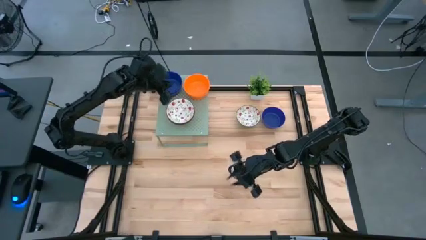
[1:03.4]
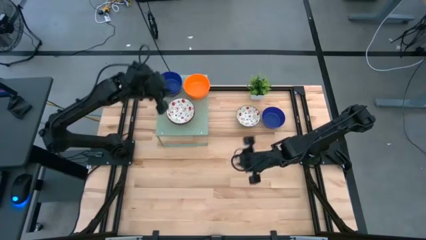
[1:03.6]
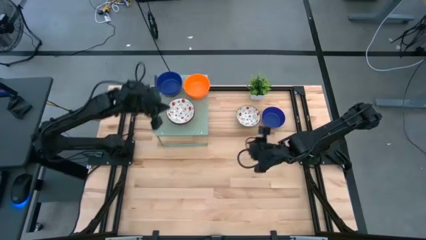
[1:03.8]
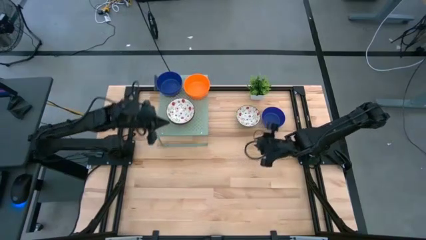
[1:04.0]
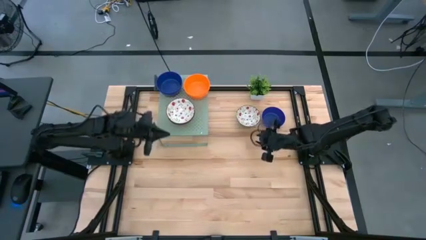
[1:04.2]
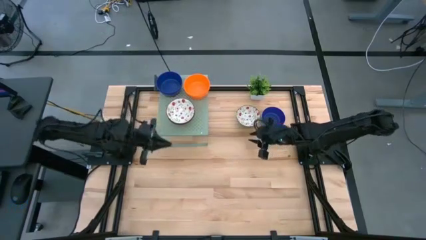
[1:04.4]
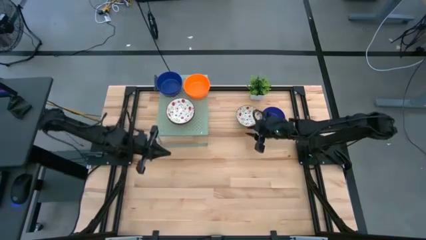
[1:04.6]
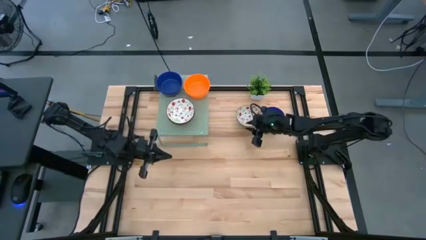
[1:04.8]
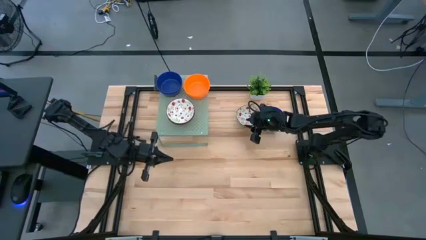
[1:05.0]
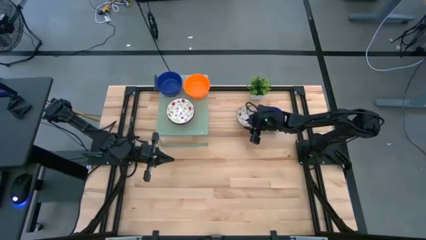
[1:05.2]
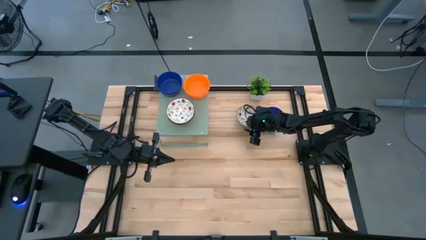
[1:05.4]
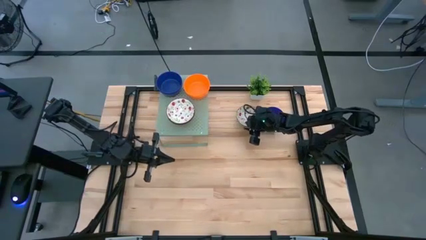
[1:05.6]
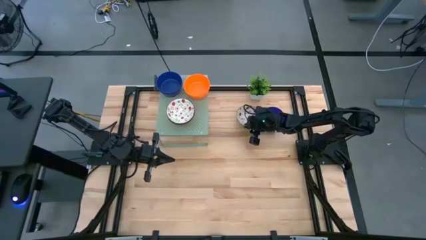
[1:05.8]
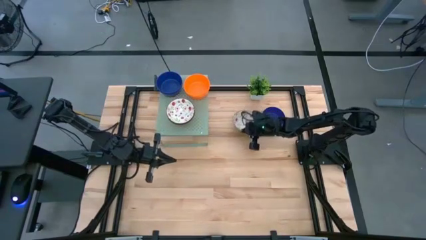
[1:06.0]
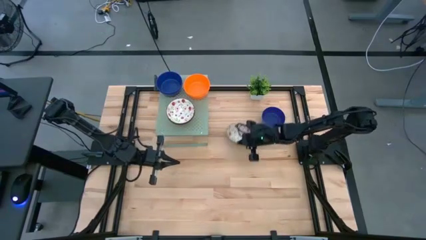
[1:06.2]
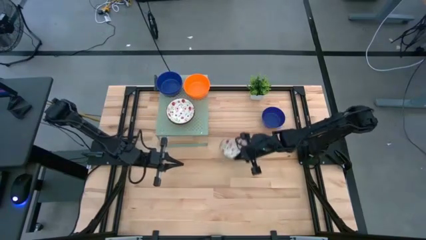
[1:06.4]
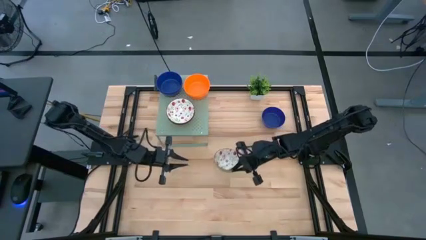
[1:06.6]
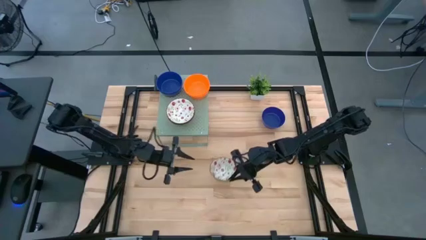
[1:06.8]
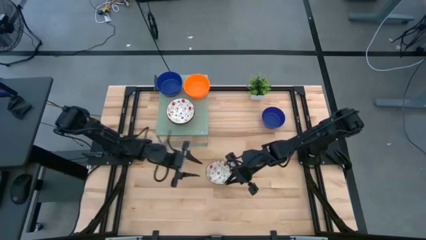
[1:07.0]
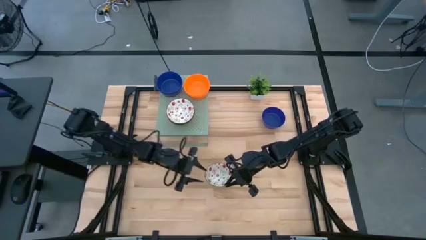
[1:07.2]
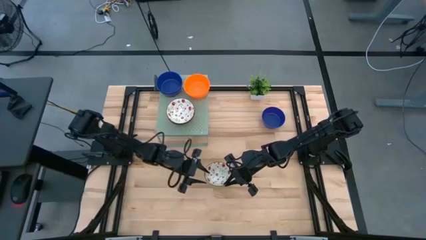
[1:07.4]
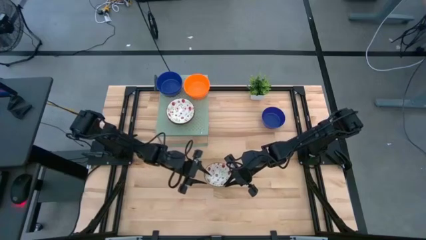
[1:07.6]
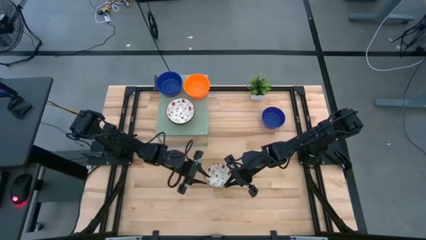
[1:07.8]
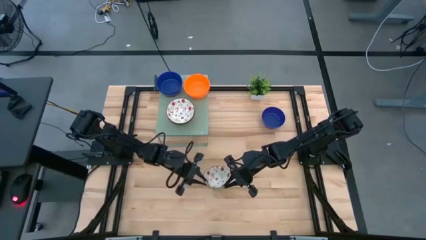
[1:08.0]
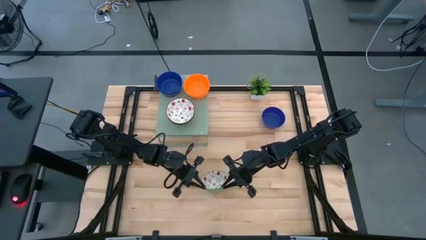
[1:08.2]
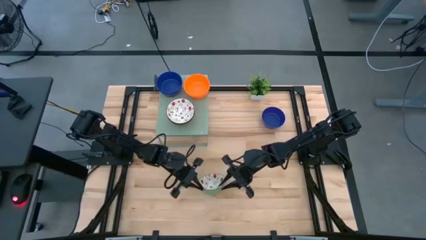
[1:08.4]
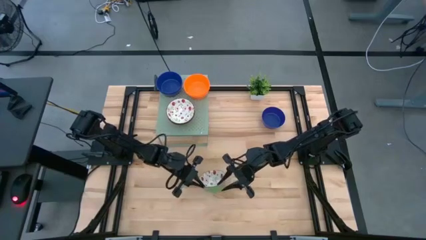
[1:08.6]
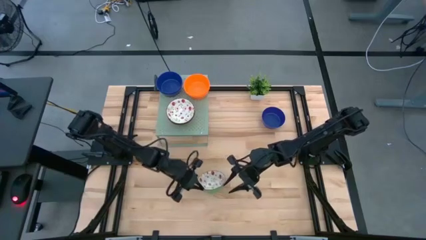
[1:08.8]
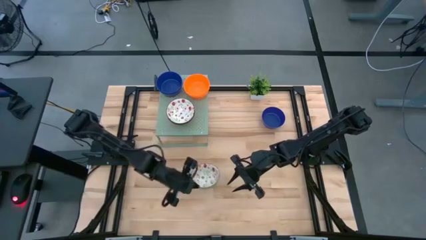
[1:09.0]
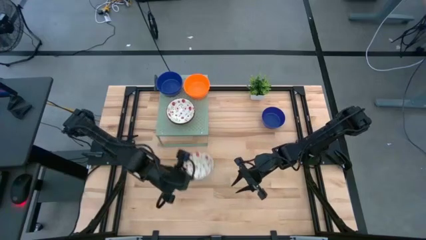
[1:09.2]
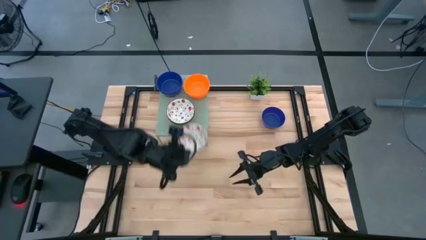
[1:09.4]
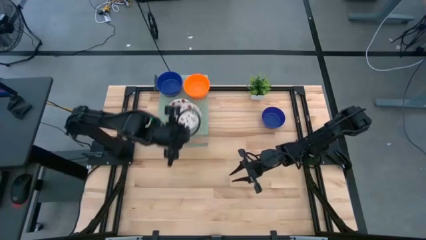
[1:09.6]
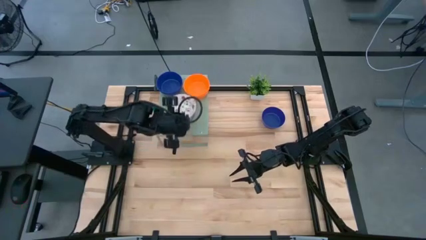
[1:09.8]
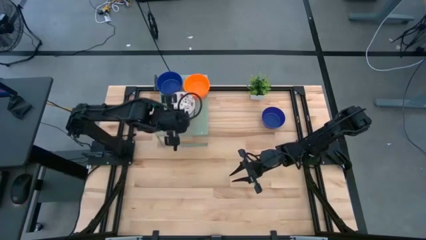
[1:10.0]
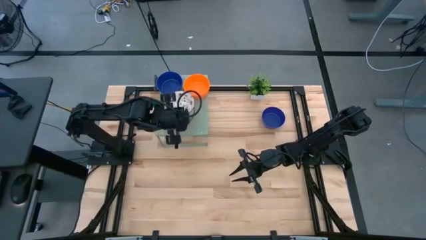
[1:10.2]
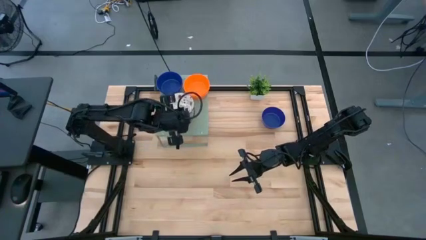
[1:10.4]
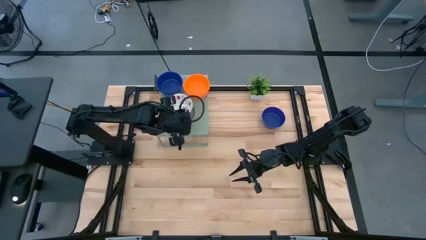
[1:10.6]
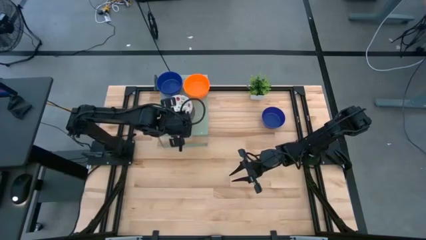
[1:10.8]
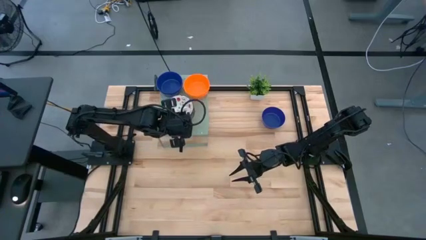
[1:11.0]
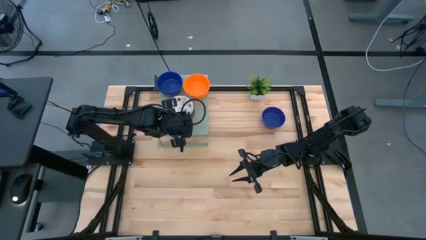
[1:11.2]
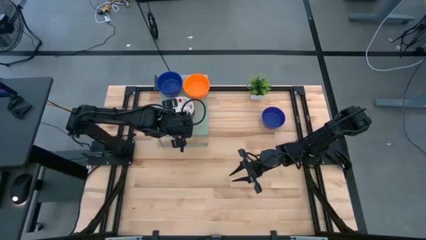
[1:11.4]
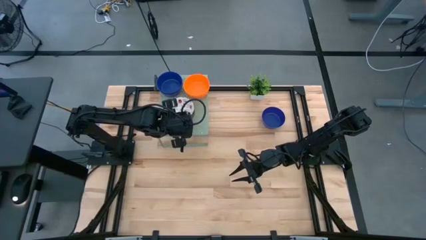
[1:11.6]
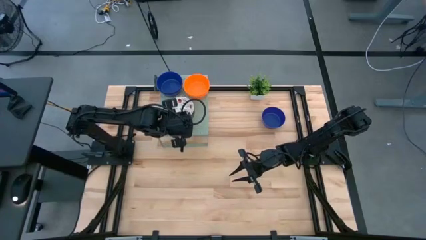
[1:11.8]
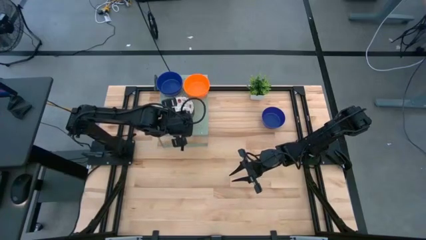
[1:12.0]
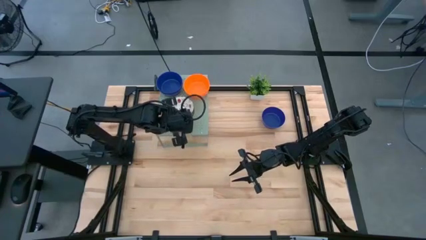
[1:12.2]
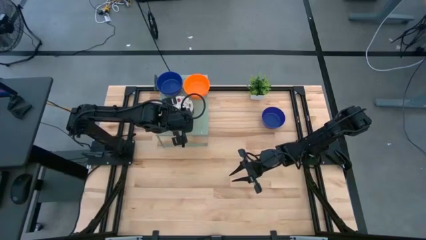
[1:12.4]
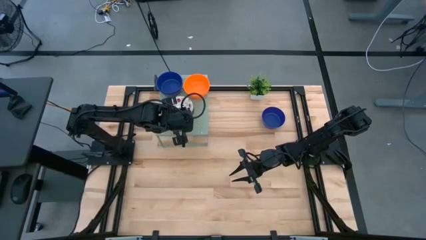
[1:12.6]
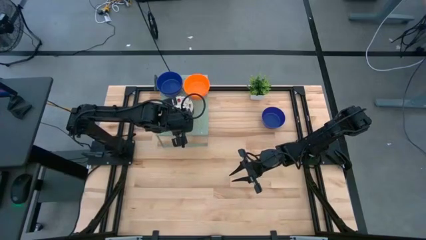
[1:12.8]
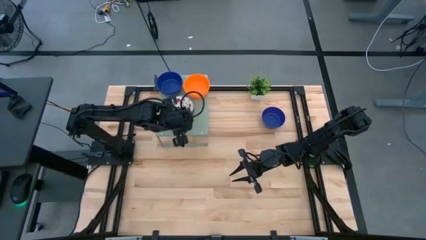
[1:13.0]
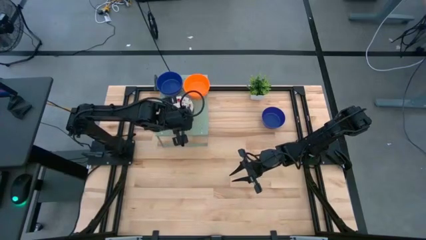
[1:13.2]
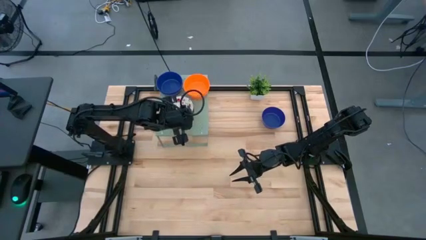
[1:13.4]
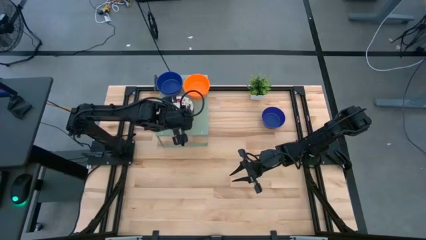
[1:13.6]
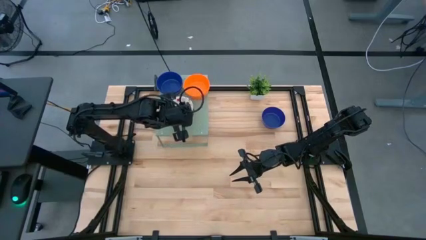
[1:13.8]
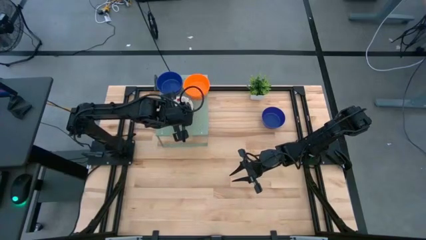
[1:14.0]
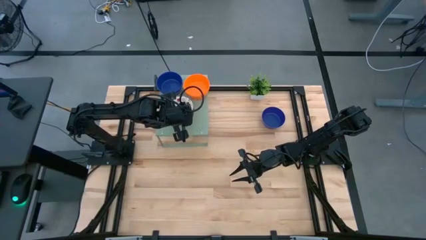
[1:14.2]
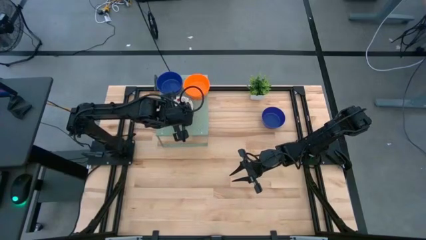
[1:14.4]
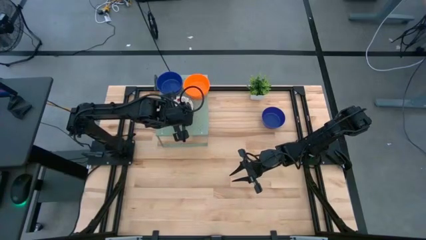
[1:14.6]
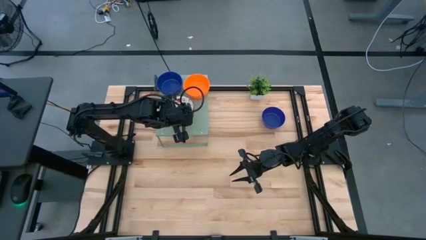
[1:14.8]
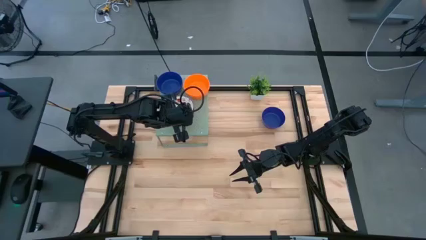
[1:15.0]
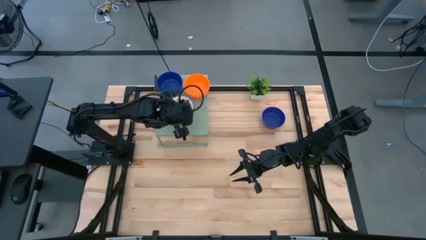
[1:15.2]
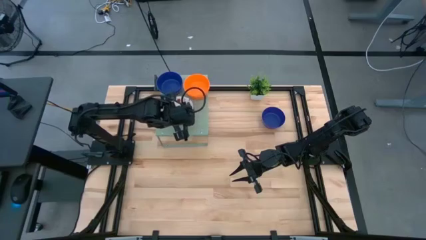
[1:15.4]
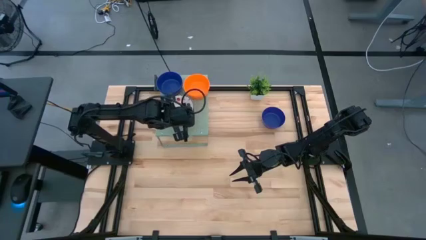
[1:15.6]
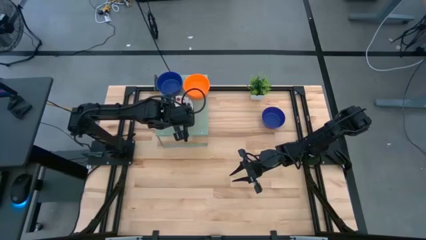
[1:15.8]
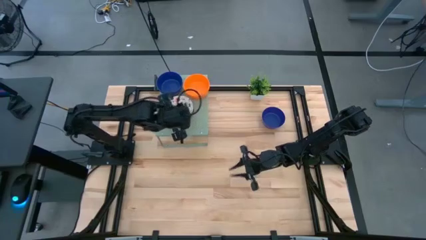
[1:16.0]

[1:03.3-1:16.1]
Task: Pick & Place Mini bowls
Stack the white bowl on the stacked white bowls on the shelf

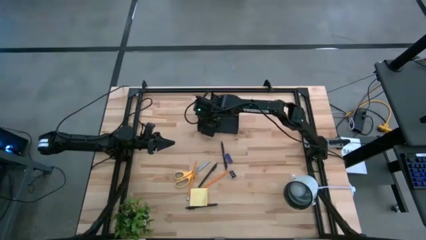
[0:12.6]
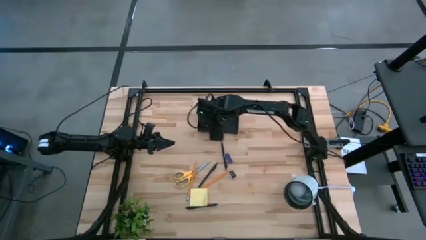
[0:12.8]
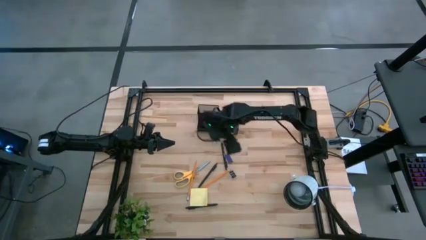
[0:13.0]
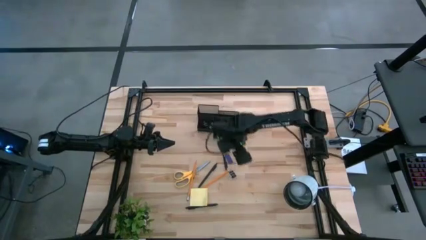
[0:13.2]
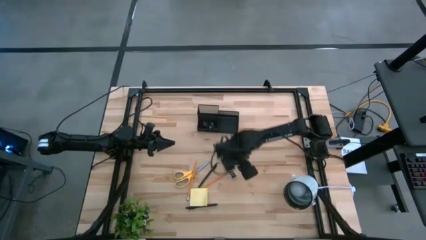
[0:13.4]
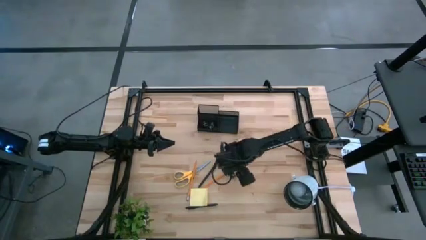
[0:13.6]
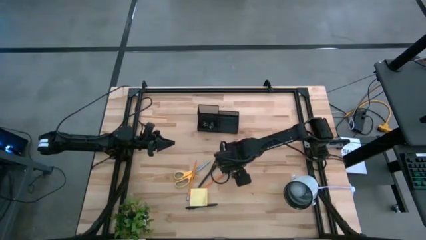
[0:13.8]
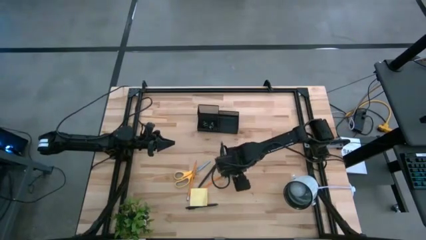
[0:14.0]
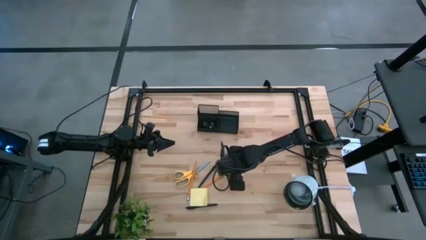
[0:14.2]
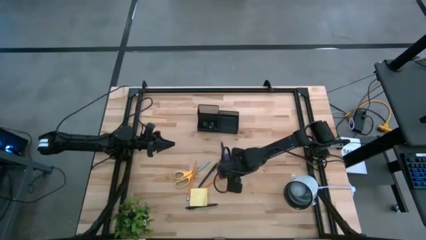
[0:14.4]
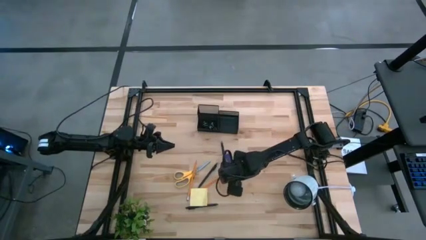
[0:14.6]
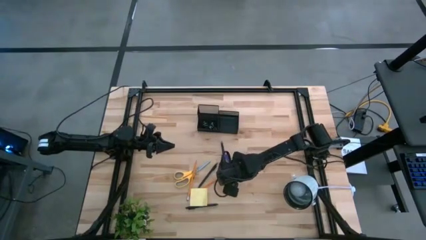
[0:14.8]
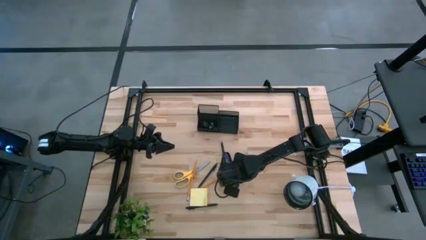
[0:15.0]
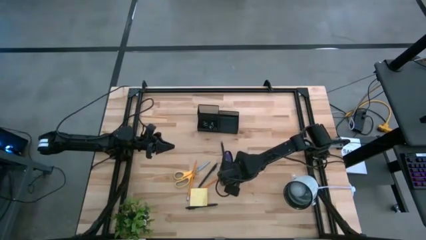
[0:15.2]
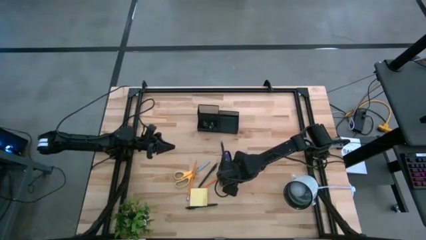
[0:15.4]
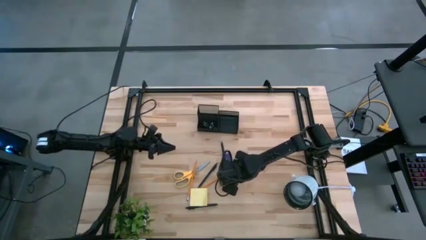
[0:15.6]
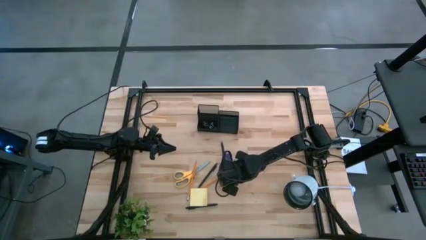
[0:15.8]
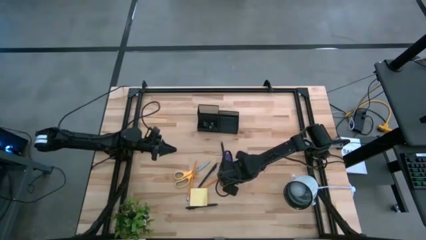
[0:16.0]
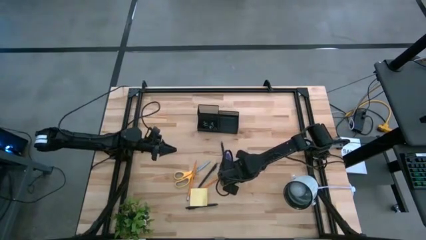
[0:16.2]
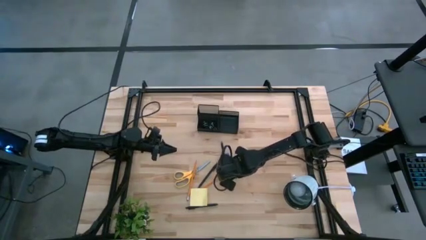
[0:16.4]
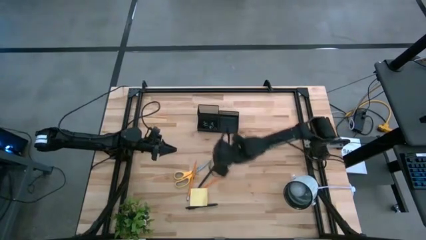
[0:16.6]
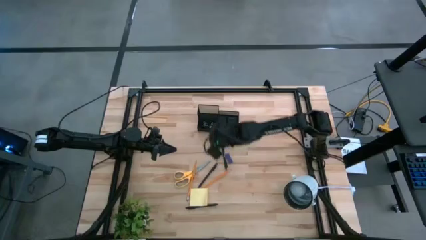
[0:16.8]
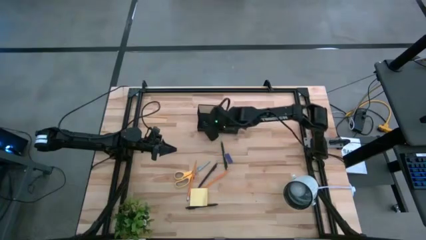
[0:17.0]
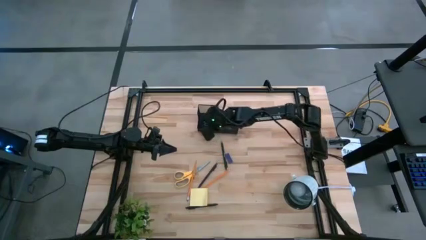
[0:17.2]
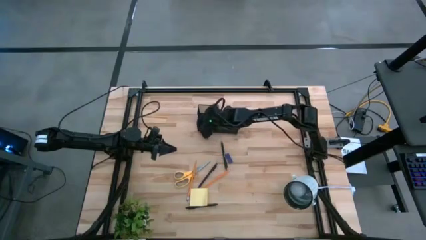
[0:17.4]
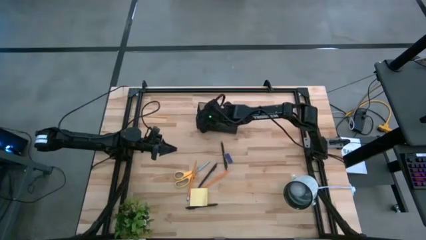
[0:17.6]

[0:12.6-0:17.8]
Task: Pick and place office supplies into organizer
Put the black binder clip into the desk organizer
